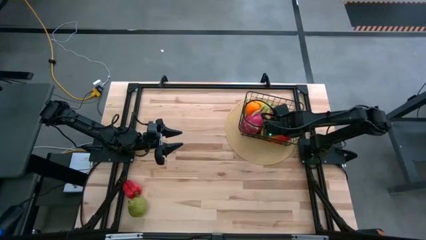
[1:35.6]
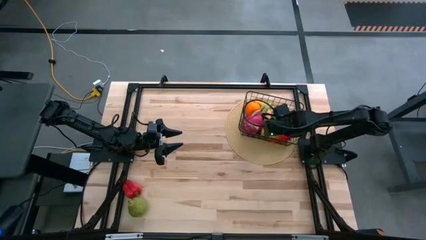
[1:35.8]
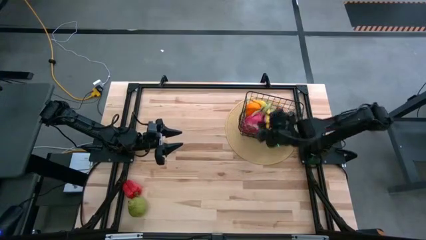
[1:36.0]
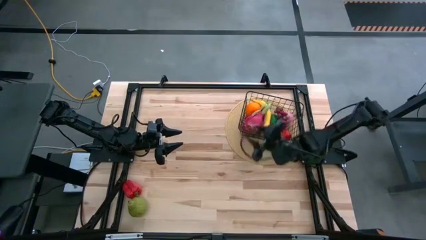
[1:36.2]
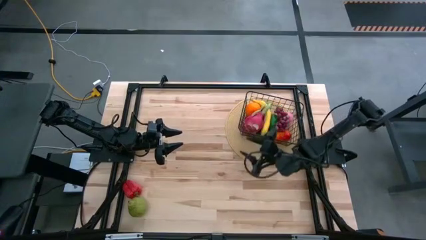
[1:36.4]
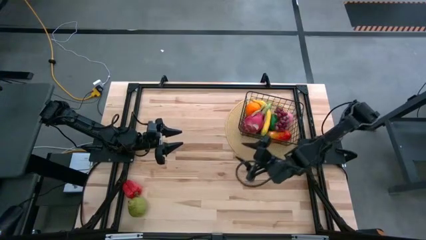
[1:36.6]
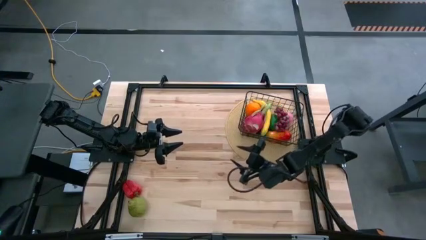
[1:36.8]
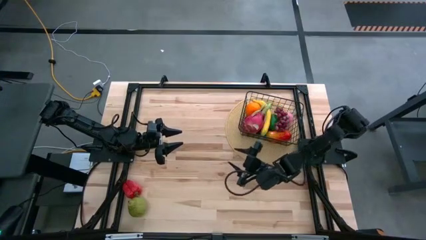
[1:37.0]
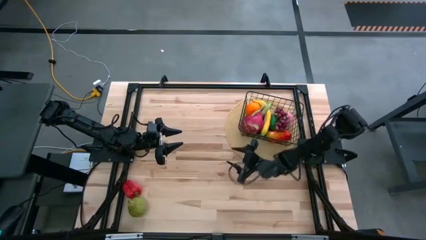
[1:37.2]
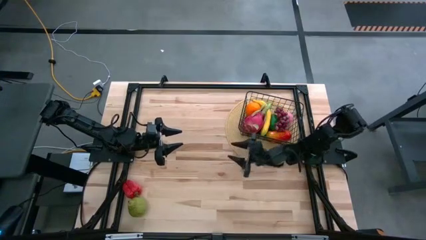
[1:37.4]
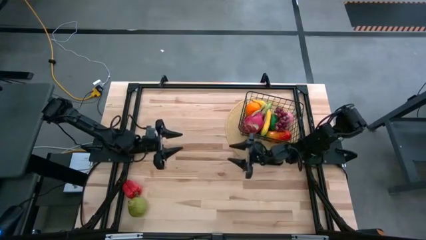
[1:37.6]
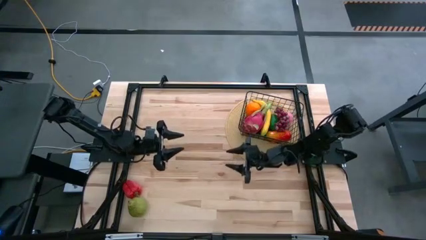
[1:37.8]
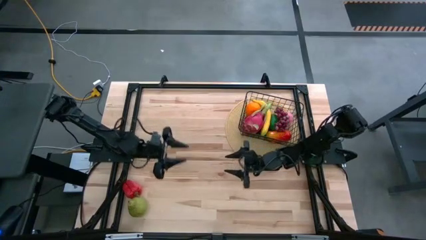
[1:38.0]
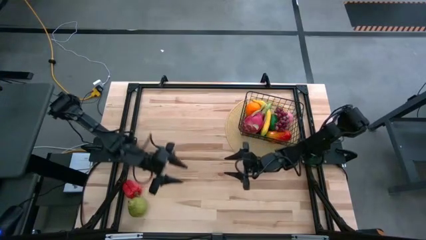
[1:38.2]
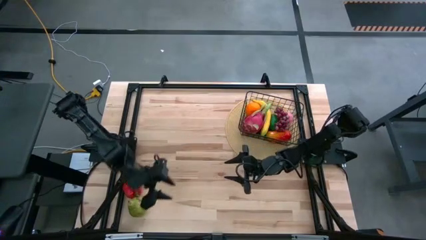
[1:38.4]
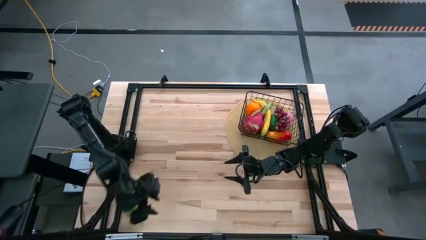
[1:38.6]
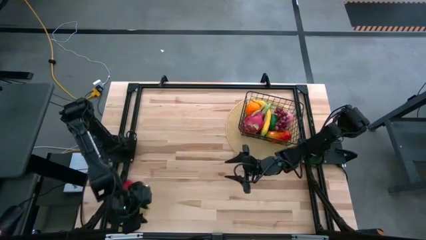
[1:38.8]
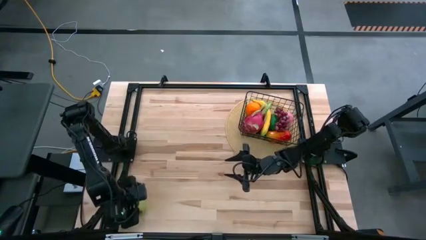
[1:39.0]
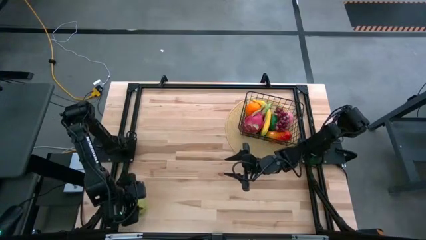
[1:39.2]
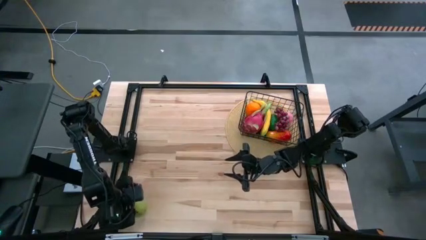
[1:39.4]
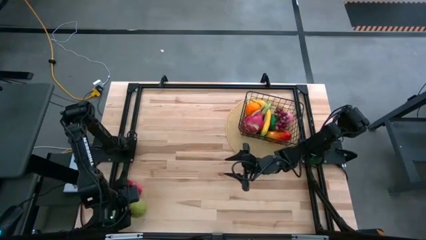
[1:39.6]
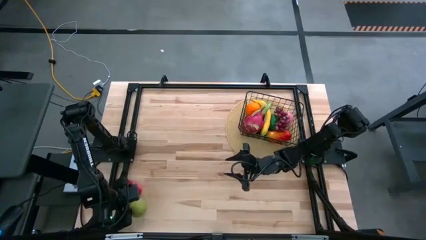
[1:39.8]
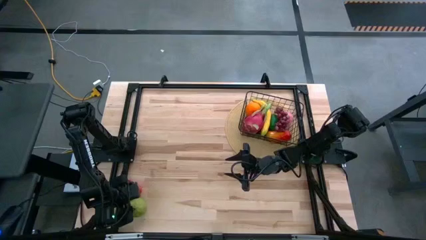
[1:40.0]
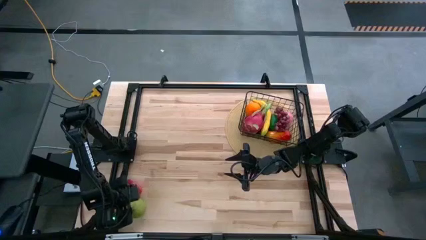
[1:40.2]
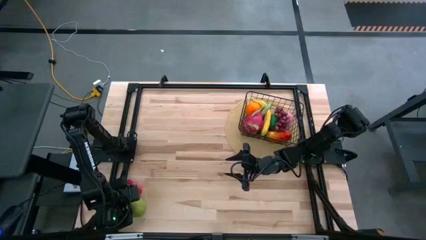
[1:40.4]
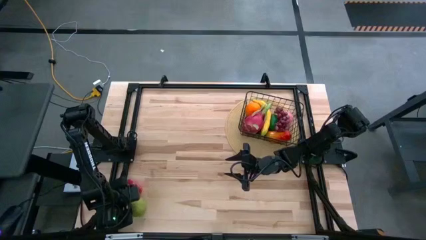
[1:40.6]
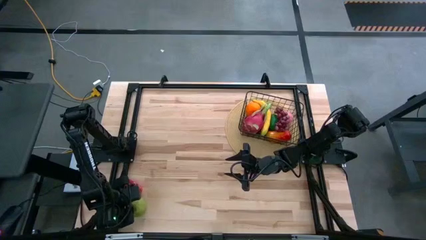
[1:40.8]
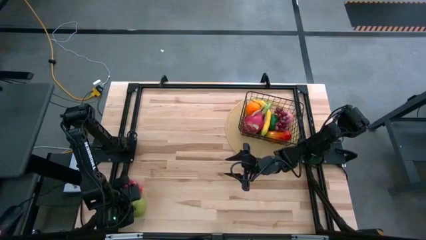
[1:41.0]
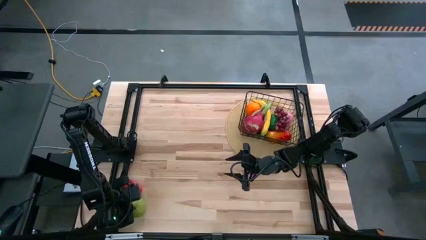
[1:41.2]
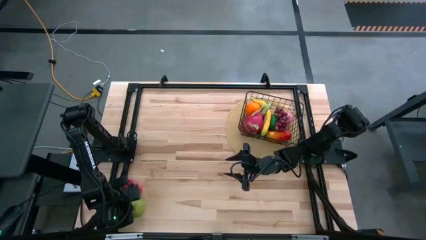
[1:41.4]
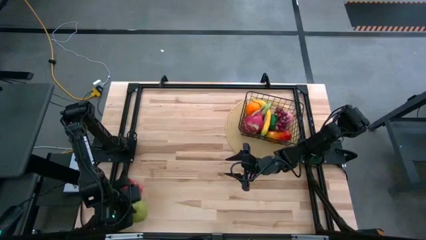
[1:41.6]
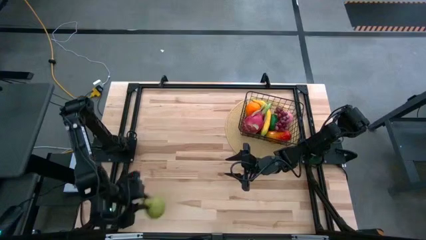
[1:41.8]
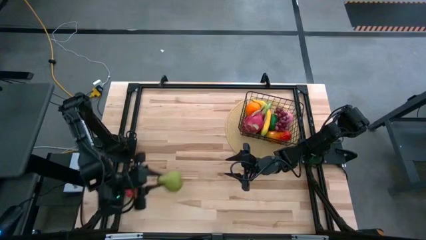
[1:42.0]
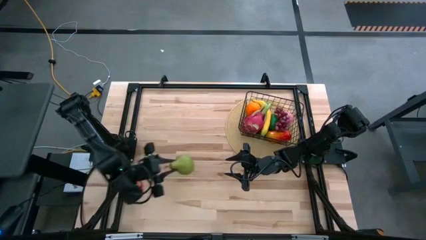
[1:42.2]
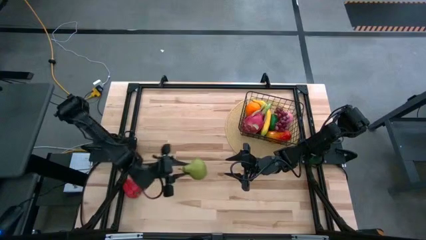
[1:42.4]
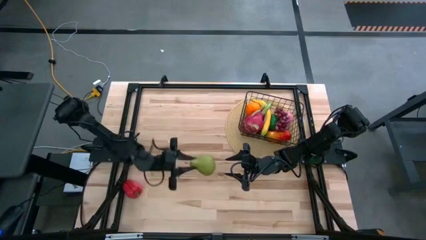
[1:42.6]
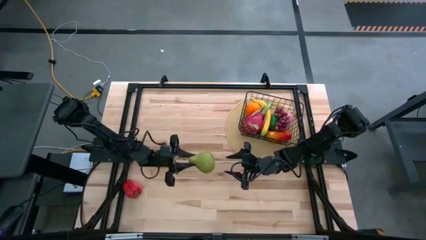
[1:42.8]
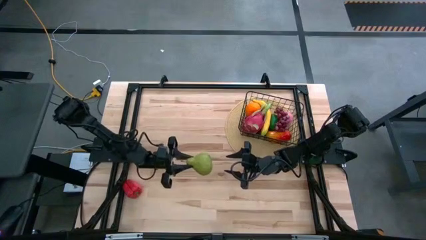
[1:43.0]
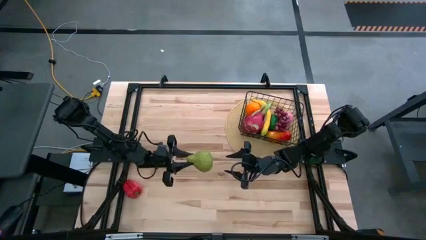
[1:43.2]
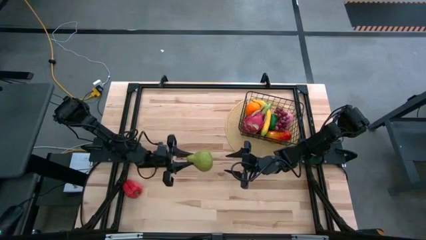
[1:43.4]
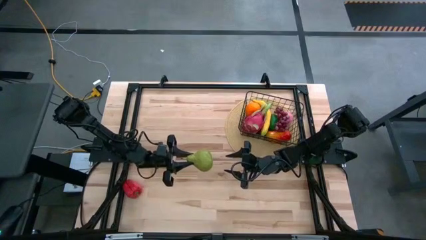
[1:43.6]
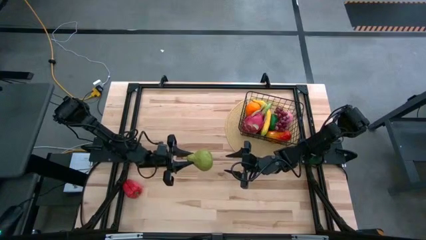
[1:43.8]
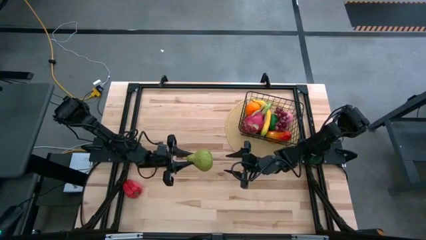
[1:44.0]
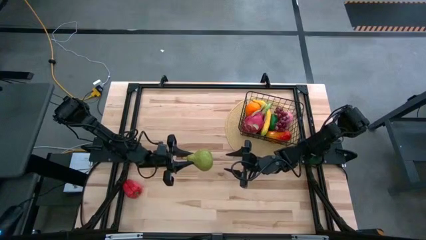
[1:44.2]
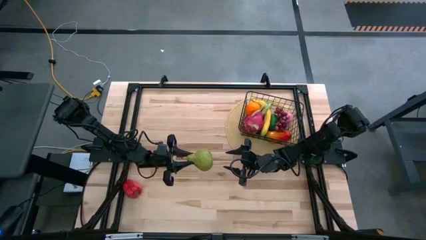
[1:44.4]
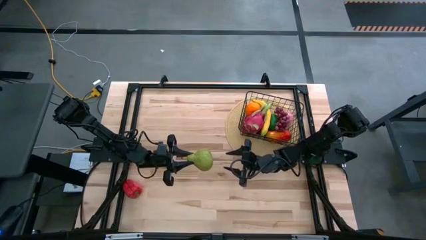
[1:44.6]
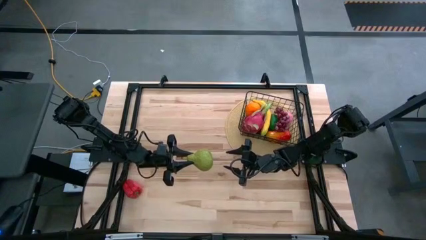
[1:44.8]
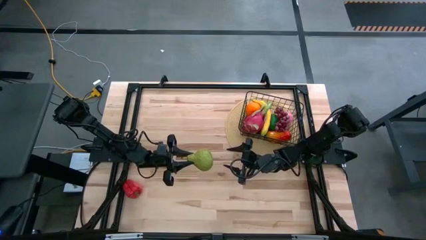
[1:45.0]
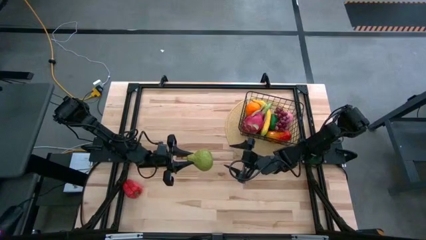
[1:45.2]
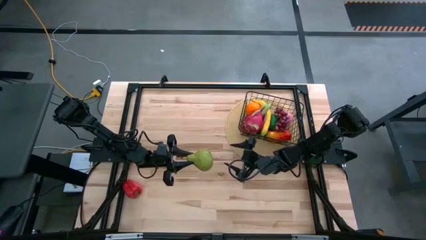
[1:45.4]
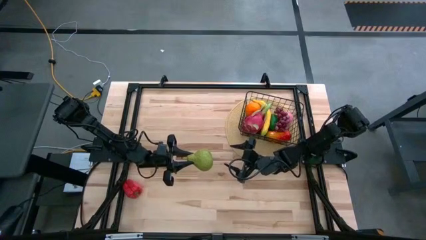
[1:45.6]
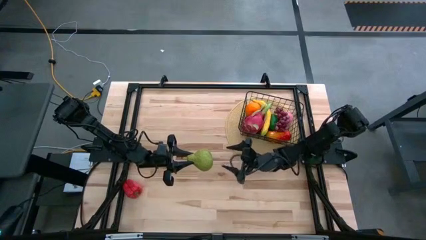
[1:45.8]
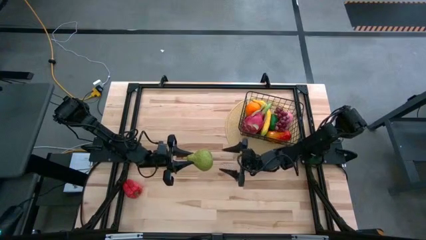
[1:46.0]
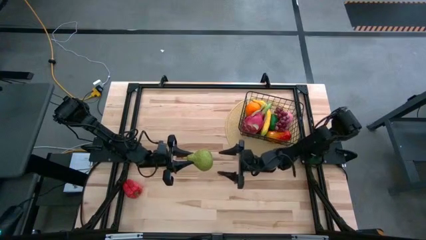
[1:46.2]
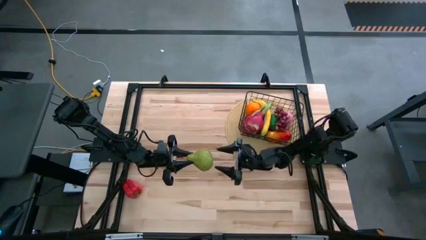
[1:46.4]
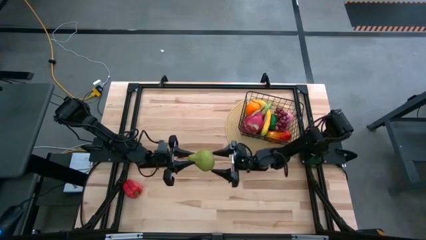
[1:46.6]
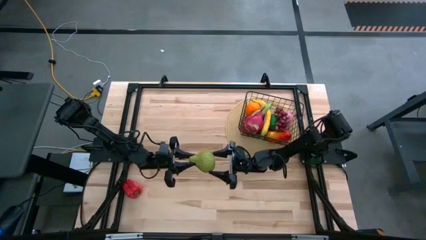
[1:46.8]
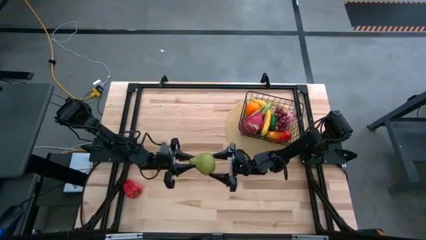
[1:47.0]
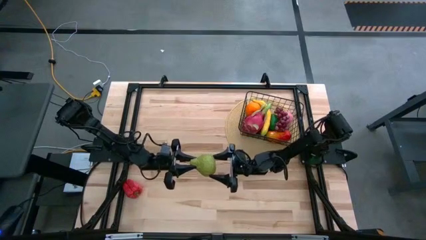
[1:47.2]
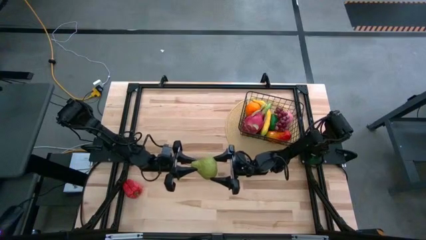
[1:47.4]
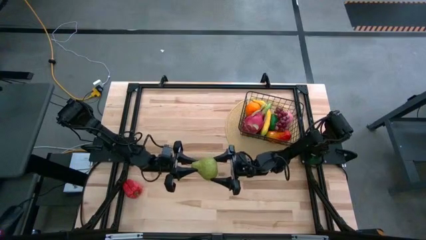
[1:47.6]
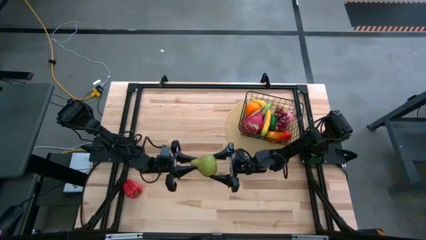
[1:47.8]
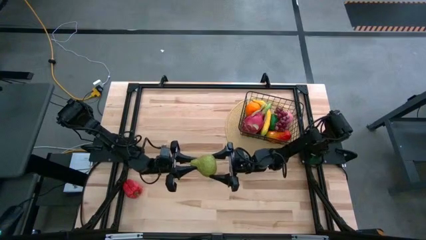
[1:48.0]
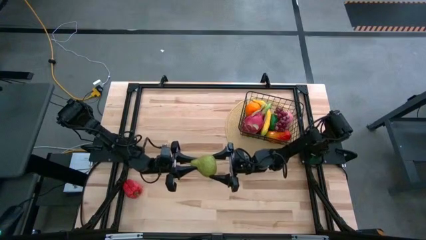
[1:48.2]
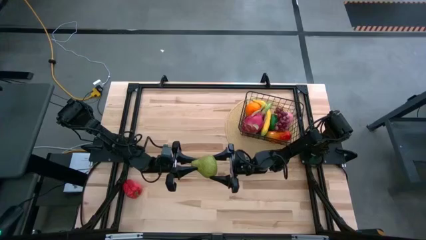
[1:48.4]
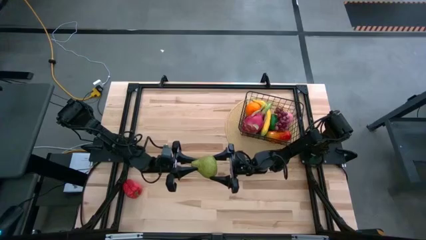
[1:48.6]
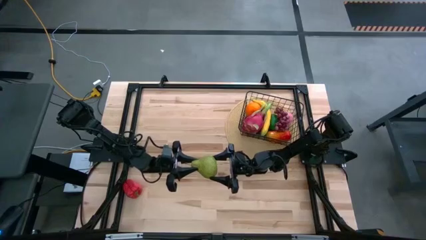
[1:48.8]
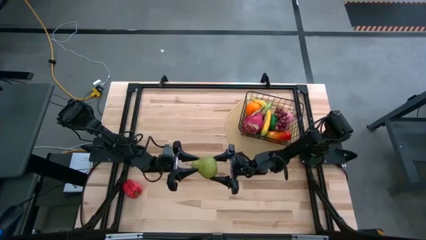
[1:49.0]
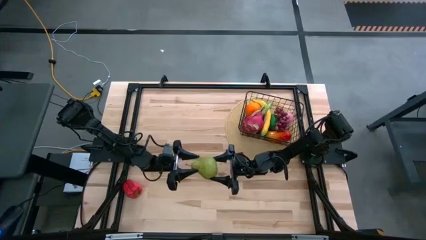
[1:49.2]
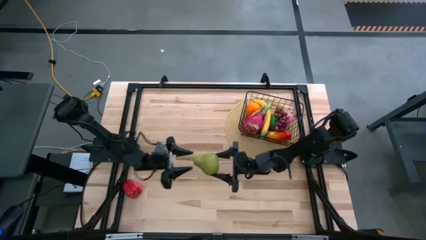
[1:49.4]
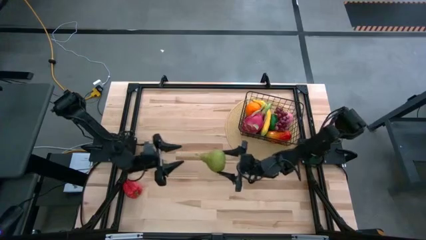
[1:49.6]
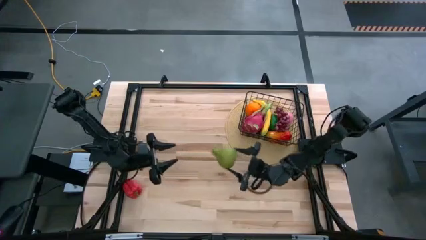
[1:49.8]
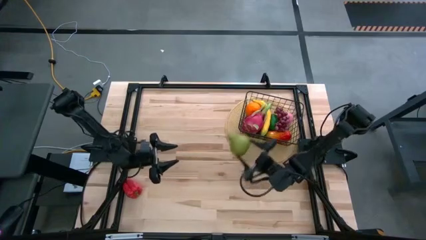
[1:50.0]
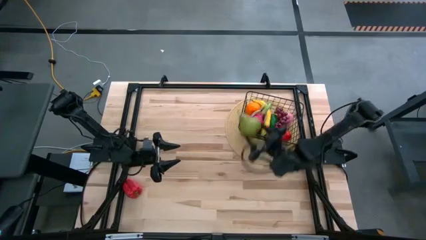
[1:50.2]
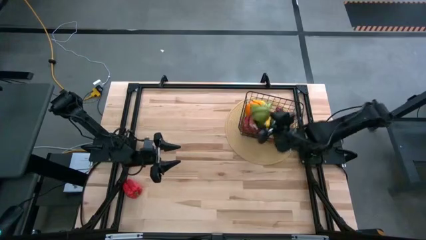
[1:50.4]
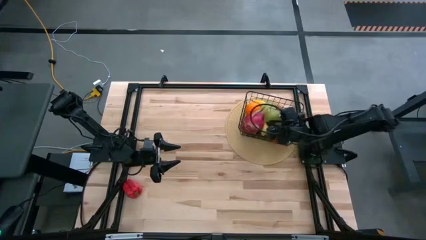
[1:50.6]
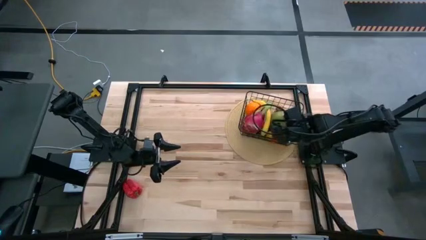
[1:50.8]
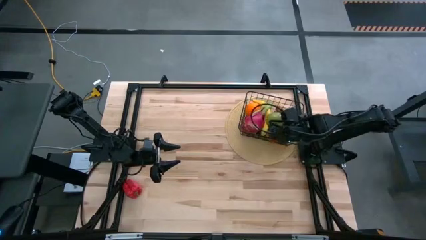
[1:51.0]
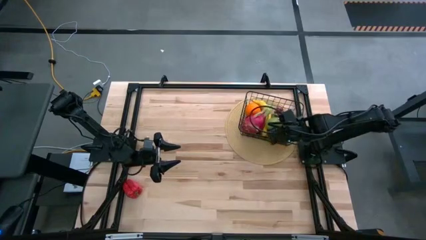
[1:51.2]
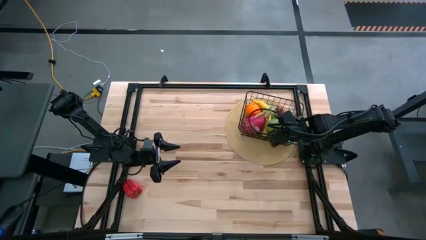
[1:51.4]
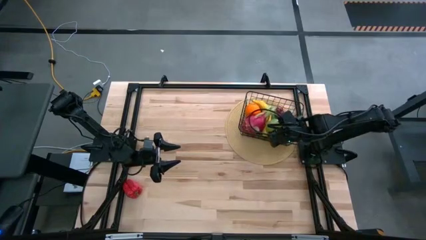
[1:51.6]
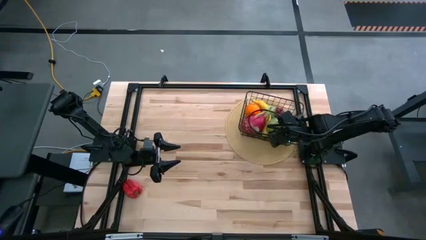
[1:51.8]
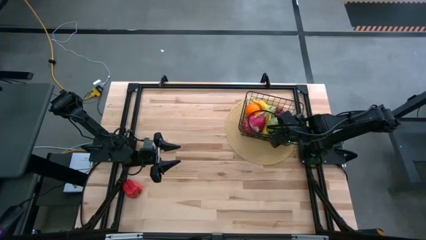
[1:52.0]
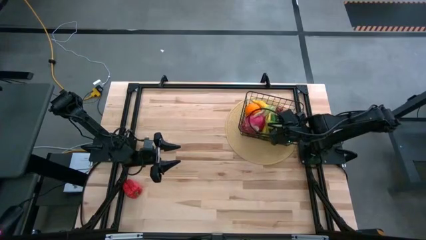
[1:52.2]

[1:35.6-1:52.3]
Task: Build produce basket
Put the pear into the wire basket
